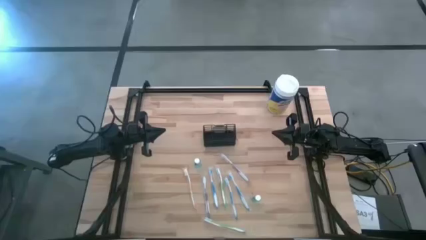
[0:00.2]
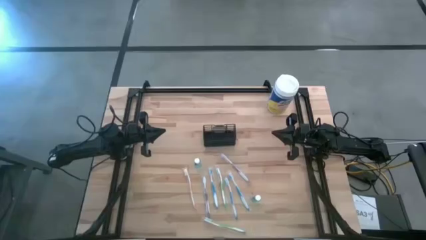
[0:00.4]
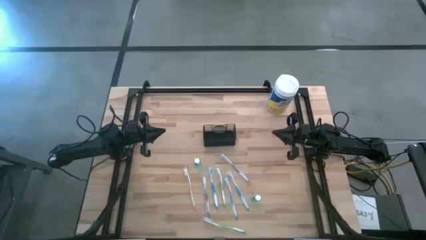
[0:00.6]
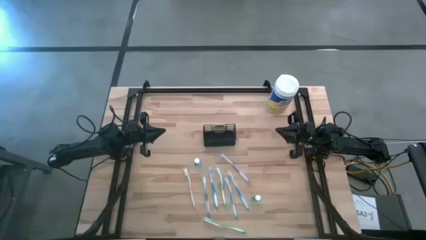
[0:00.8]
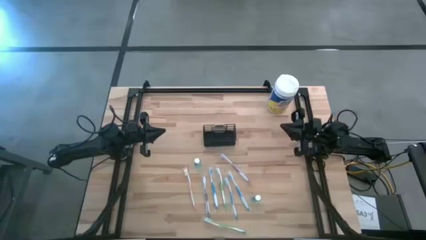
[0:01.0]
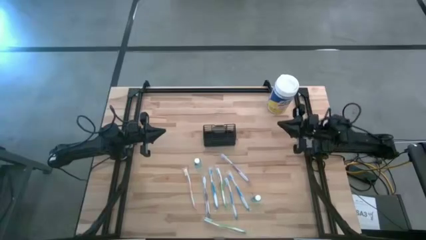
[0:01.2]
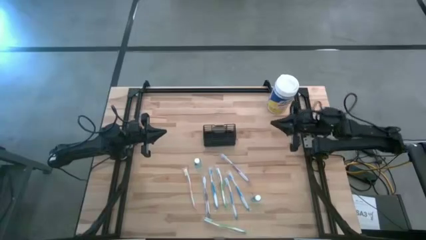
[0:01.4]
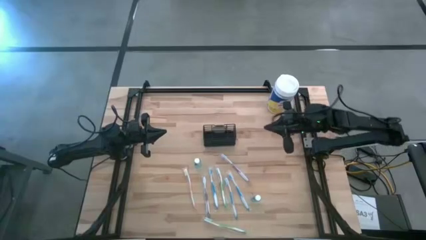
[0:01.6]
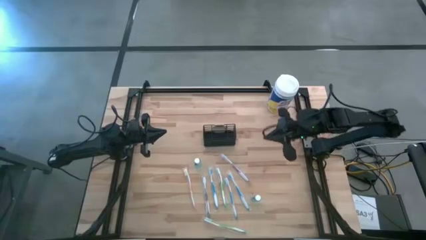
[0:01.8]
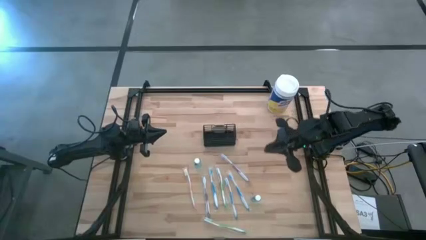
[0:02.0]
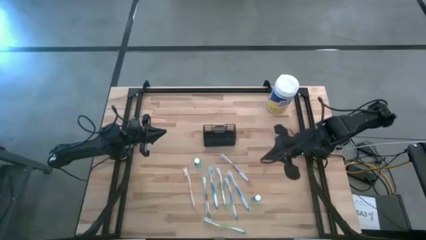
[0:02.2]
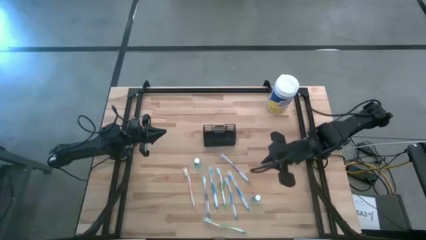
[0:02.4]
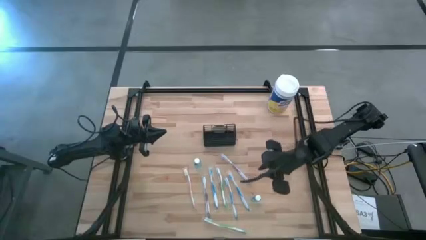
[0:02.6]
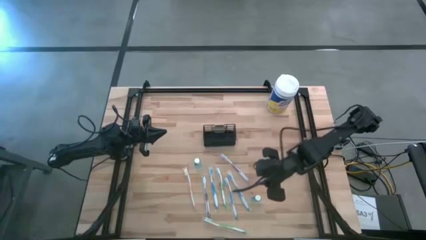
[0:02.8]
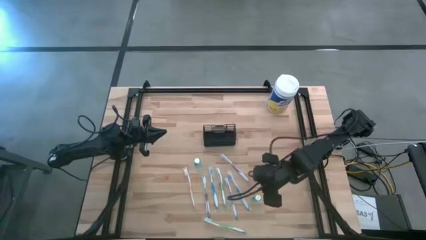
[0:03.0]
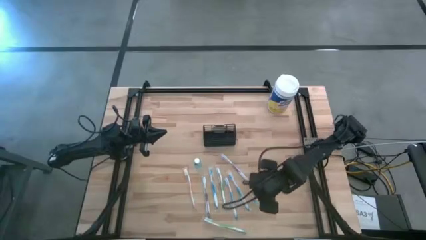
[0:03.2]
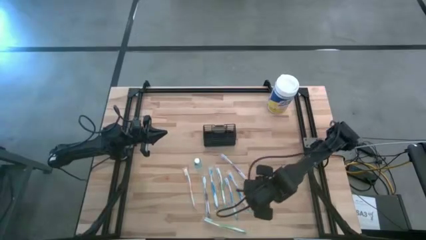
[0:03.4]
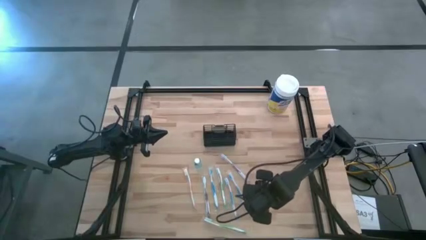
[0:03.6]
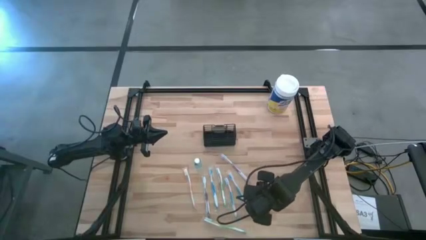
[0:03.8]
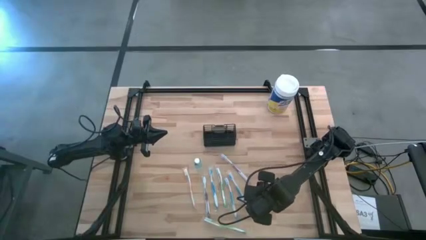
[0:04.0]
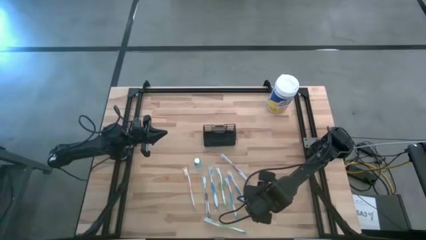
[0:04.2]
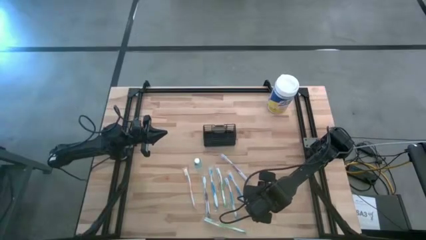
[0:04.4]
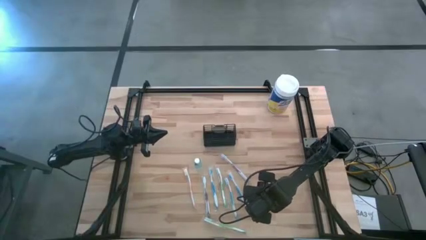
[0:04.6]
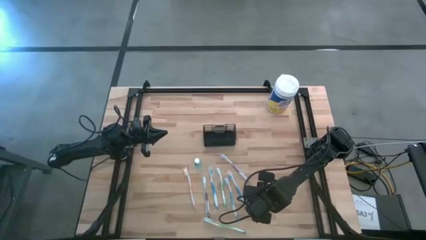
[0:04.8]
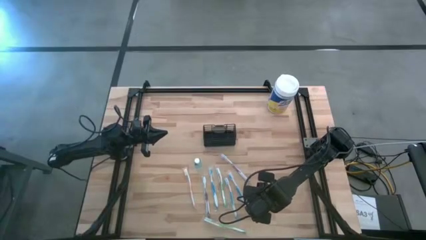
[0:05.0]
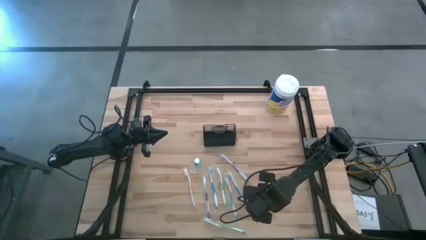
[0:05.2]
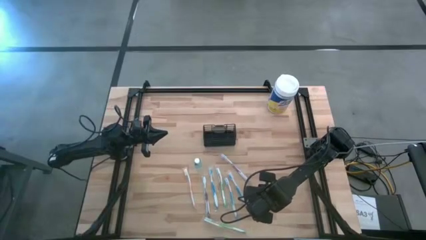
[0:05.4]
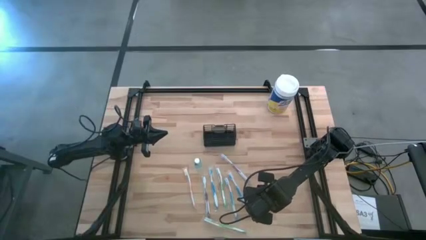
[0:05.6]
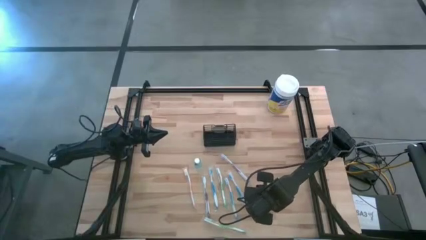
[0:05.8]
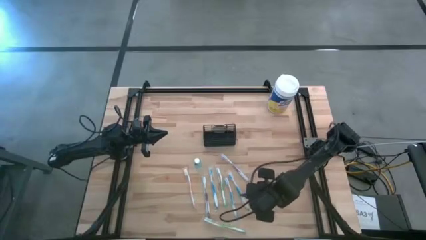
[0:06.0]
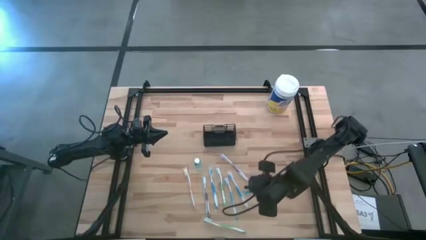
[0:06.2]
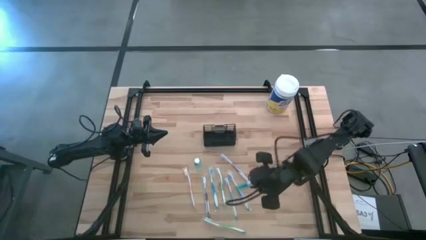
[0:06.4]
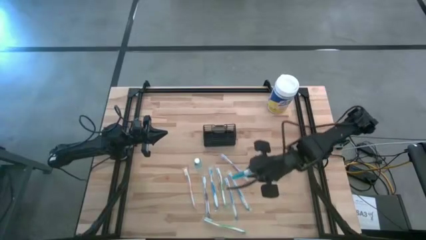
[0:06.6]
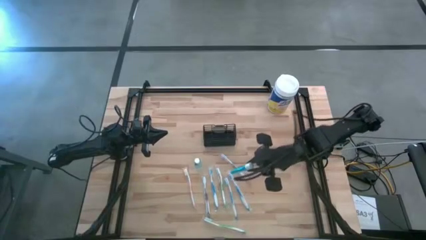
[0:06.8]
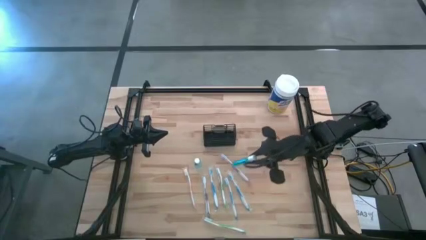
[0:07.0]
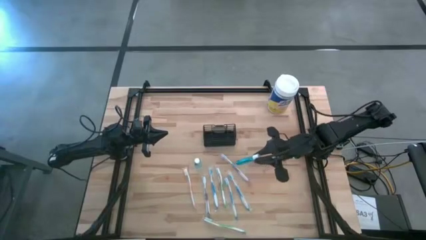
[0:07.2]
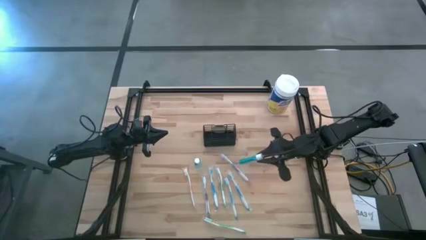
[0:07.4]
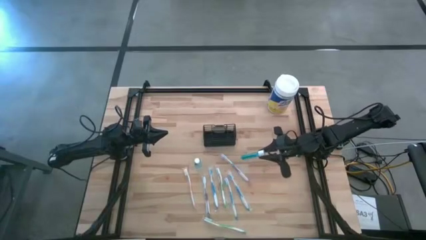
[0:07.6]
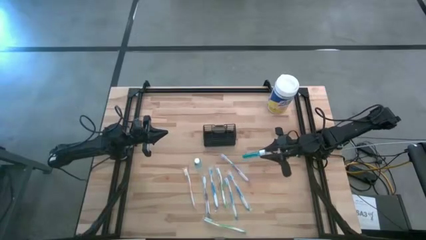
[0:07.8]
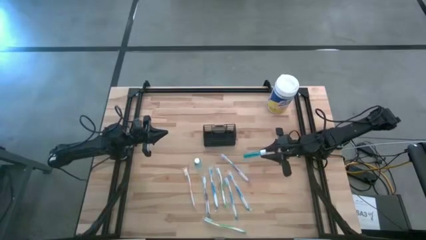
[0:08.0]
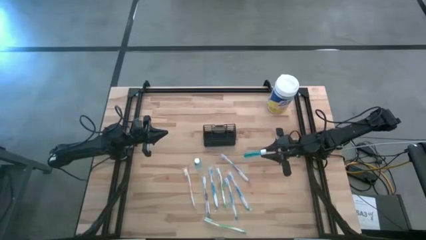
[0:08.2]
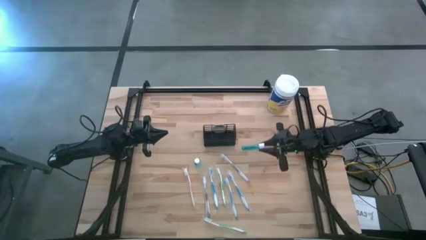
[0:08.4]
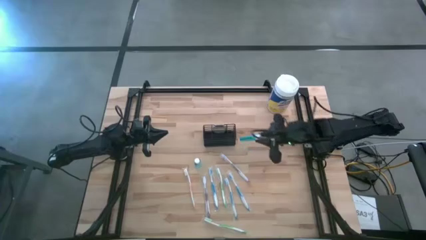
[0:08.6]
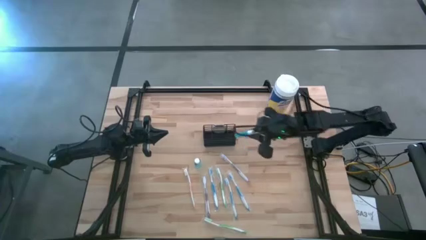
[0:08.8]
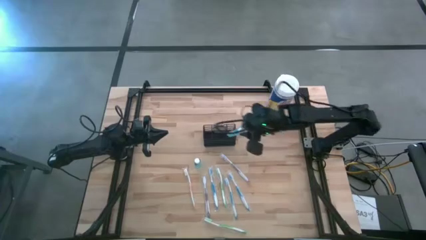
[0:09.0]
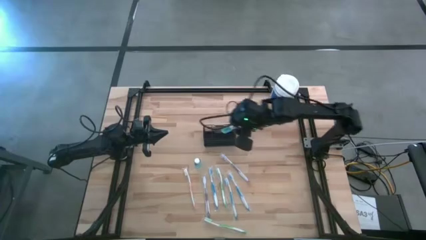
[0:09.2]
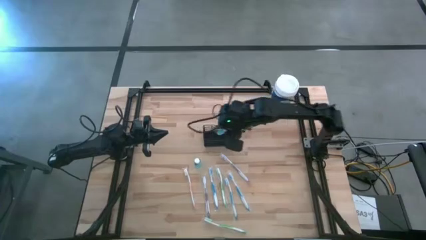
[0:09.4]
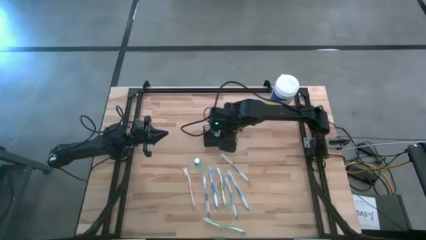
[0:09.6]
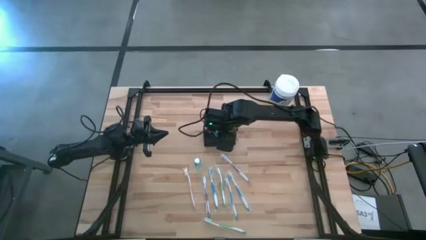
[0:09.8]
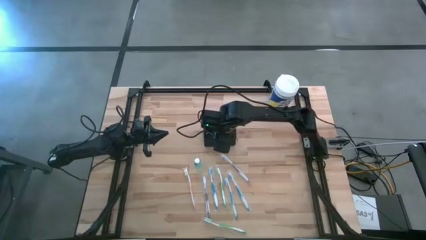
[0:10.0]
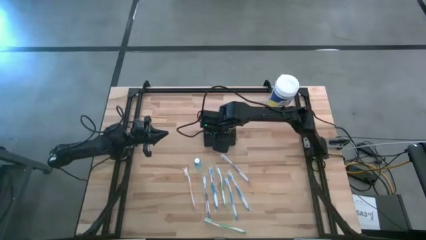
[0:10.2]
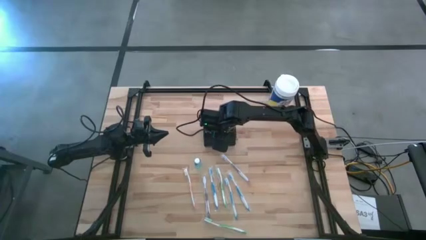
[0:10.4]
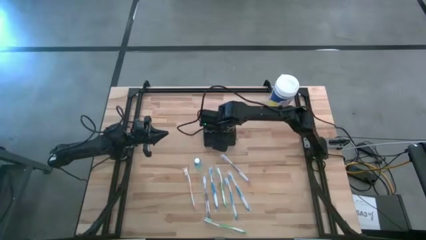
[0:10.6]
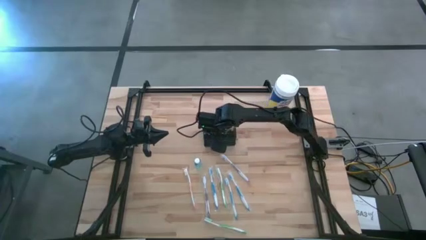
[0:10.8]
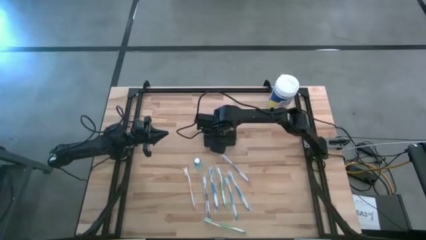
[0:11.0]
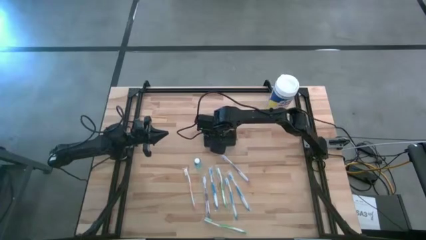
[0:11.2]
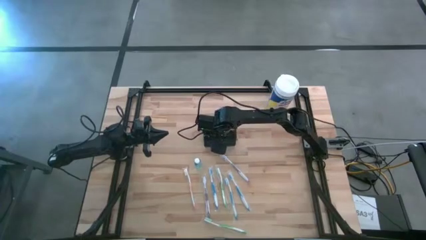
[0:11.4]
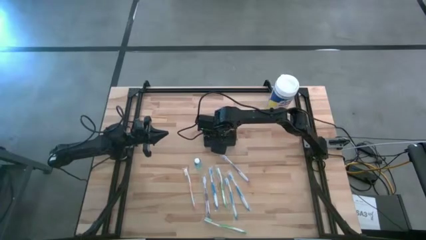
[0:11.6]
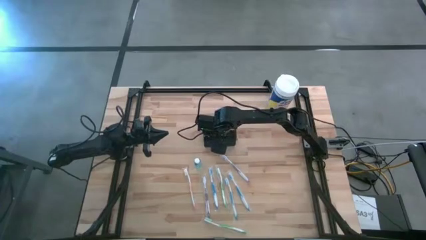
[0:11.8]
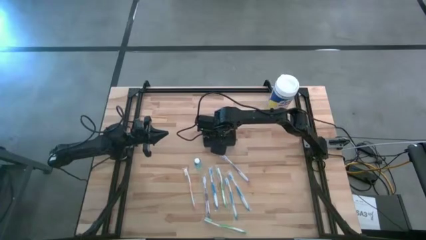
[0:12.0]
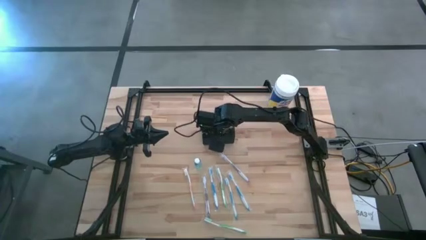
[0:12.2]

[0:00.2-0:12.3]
Task: Pick & Place toothbrushing station
Put the left mouthwash into the mesh organizer
